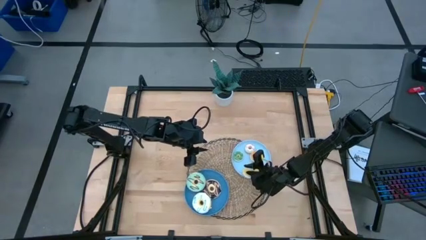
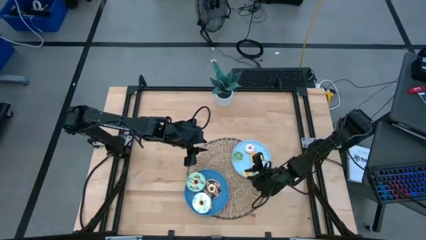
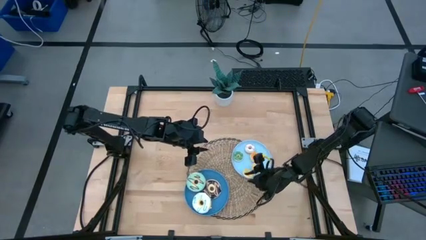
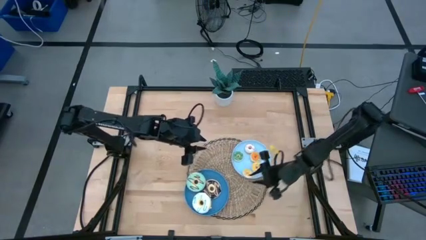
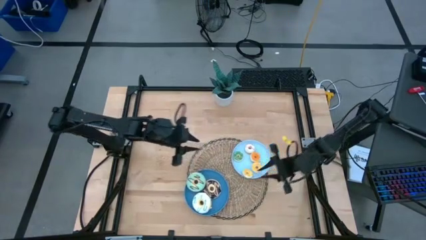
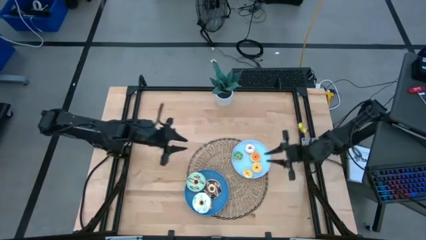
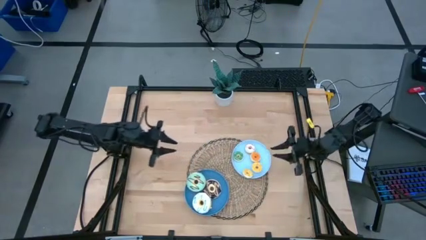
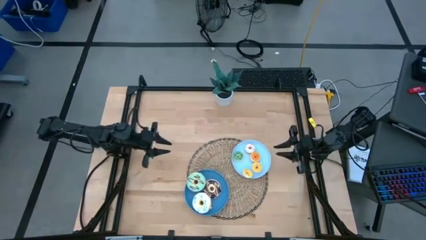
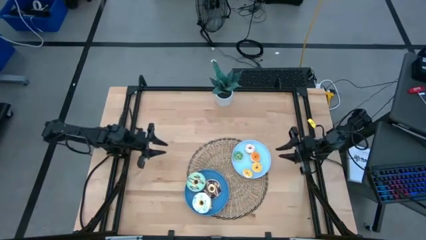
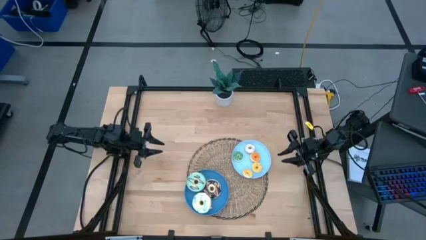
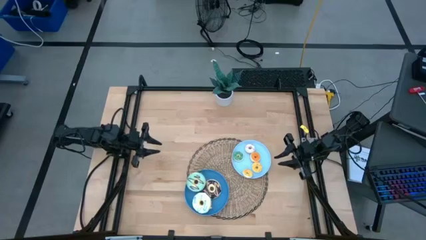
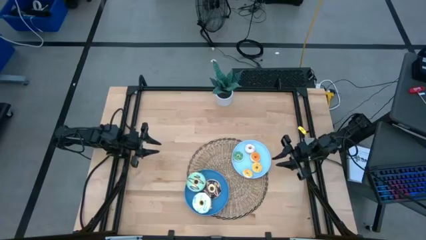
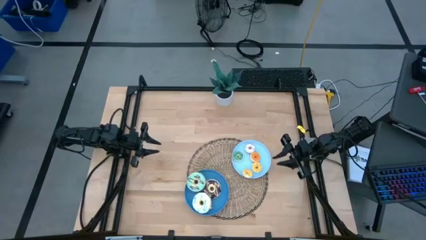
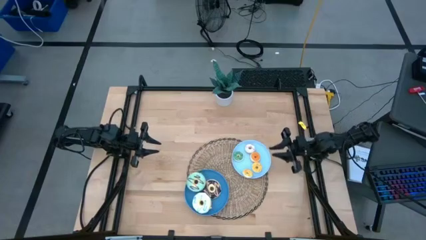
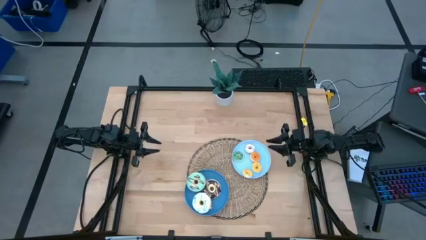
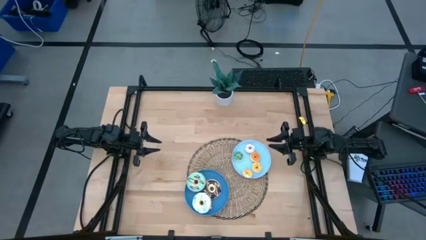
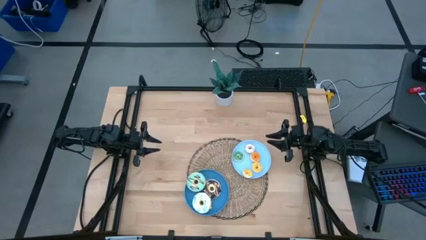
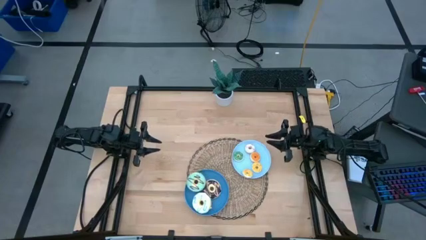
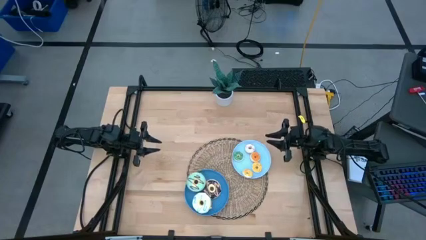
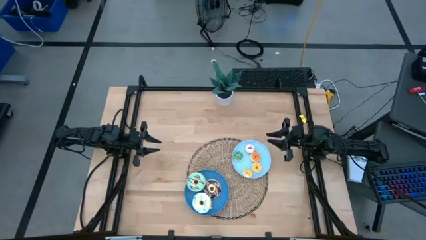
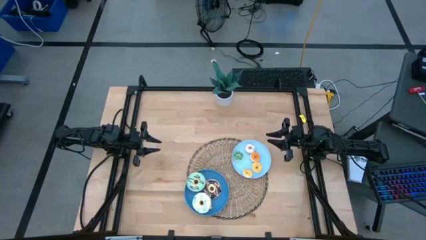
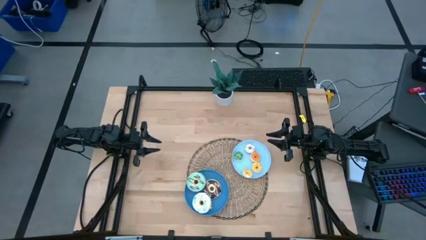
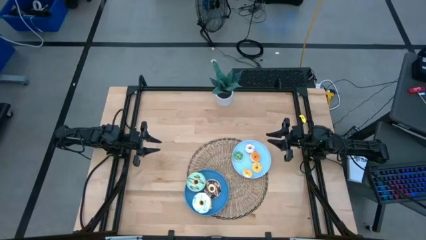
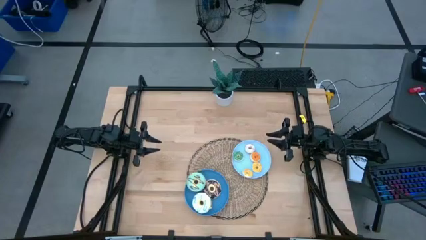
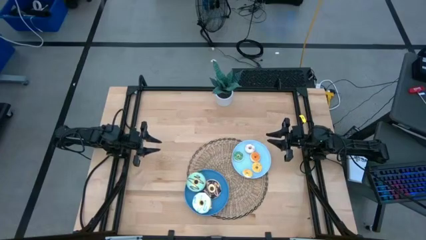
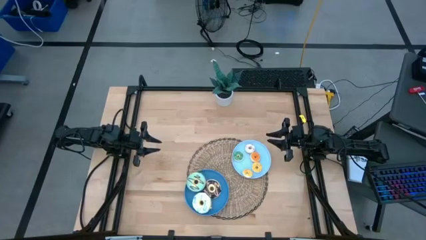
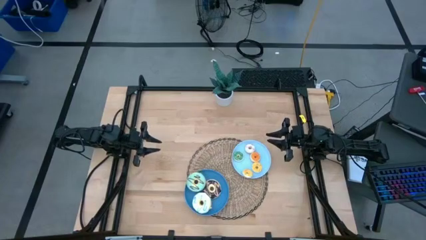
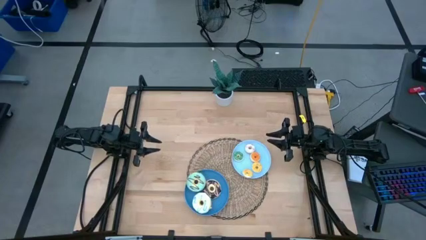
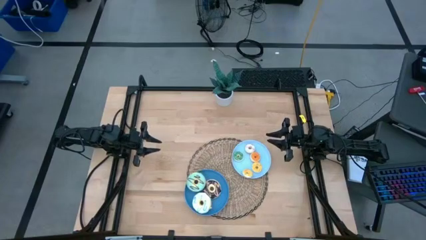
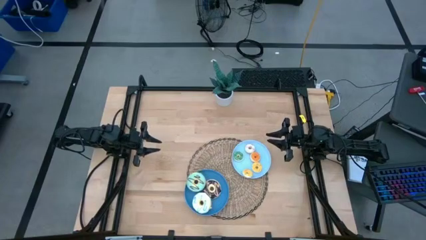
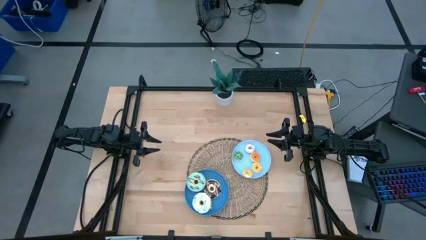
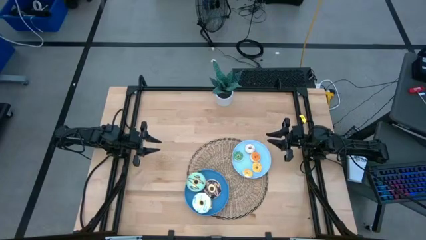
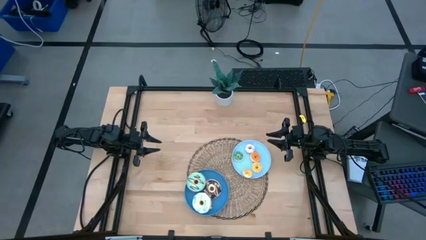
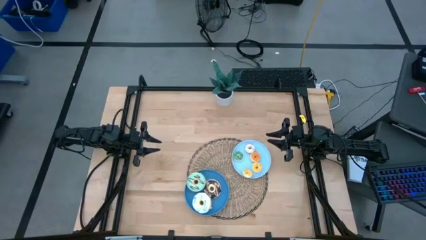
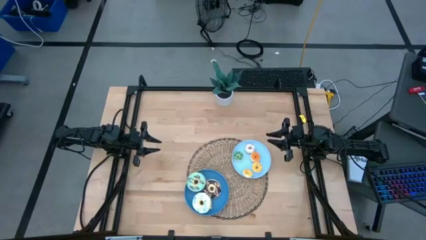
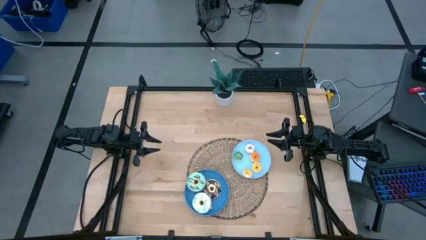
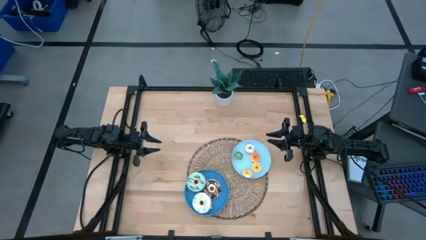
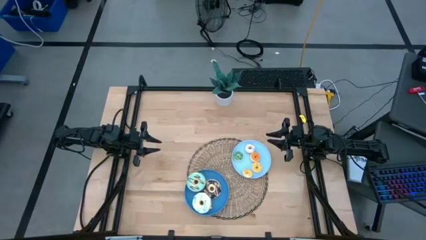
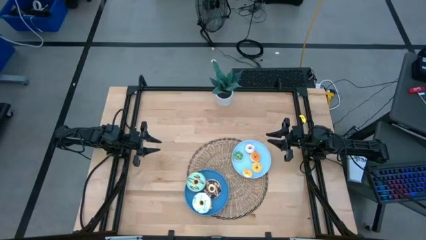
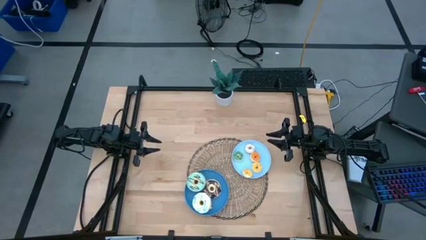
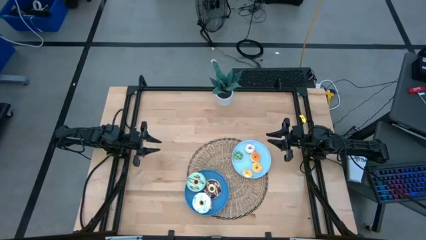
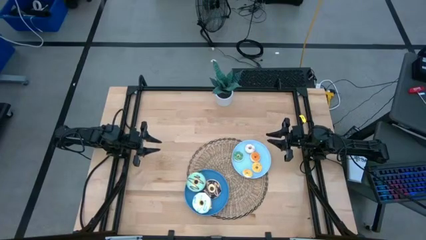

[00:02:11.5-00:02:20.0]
Task: Pick & Place donuts
Return to Home Position

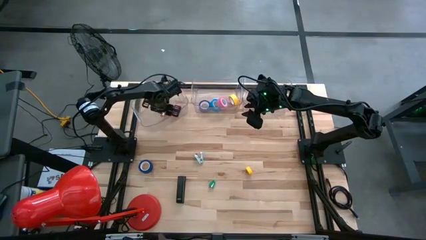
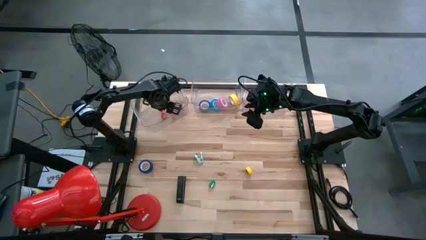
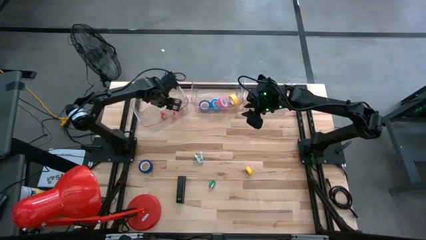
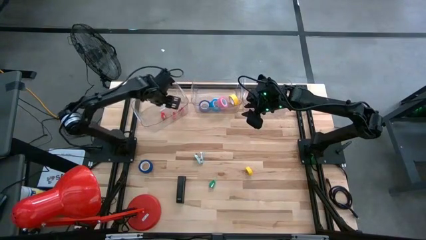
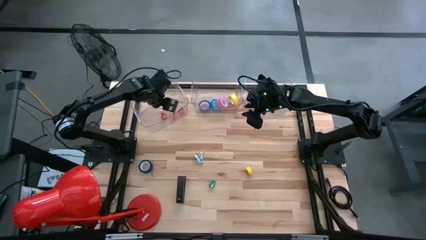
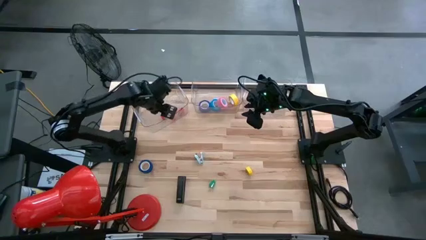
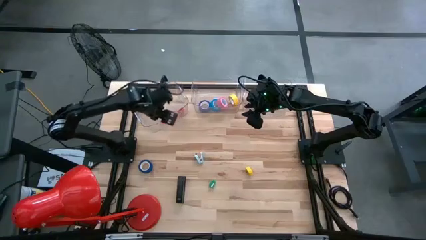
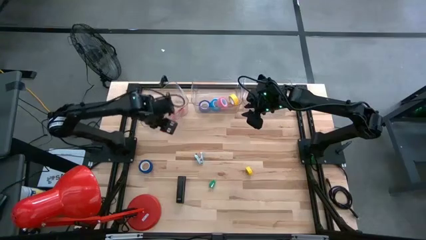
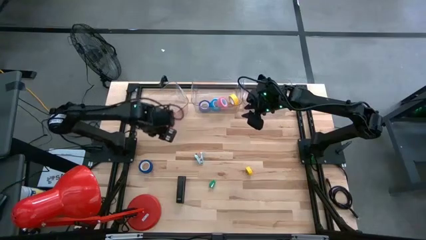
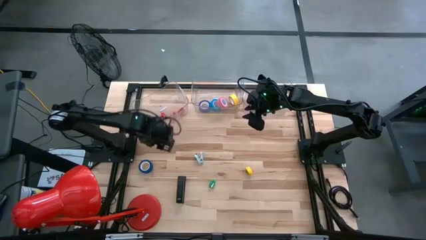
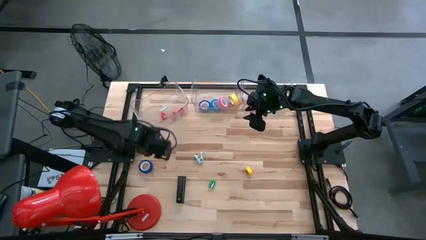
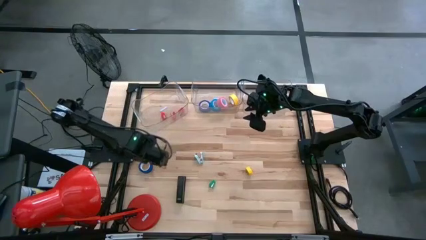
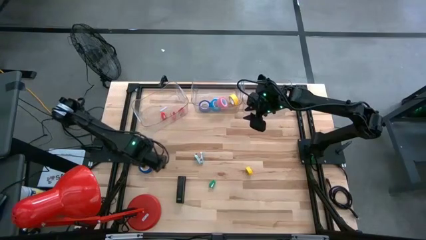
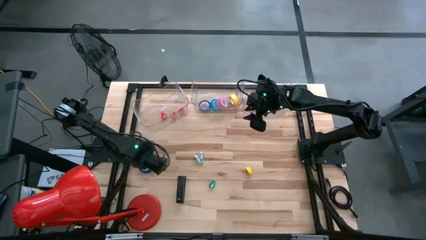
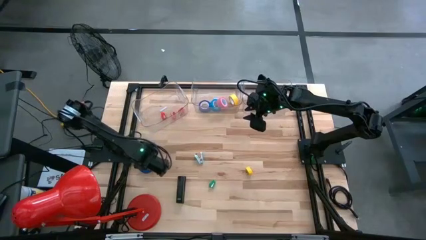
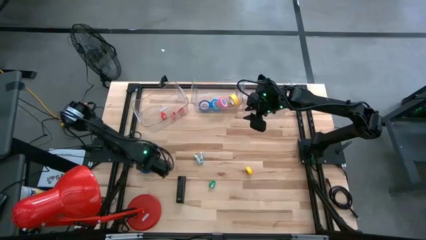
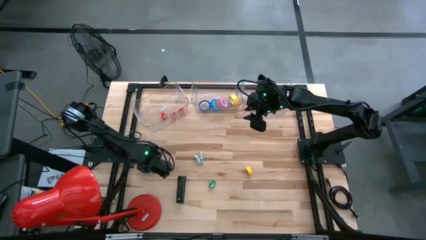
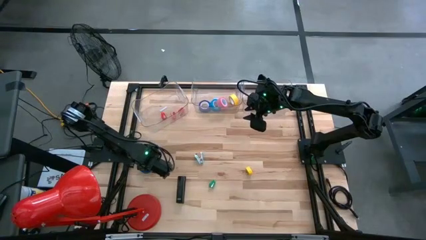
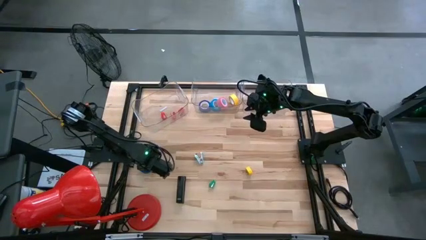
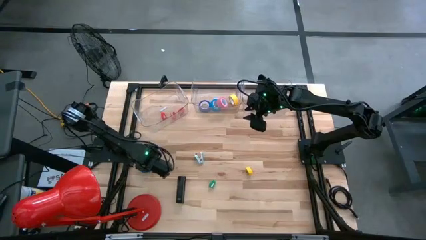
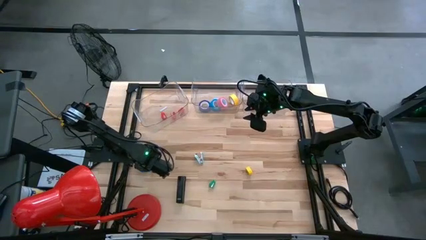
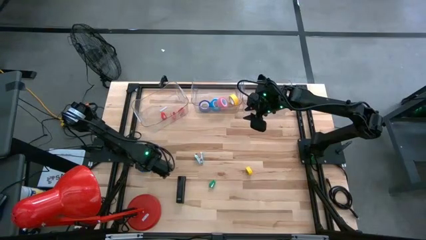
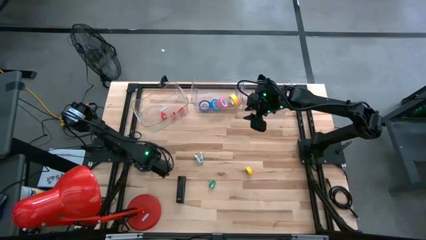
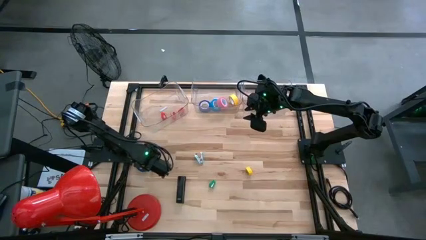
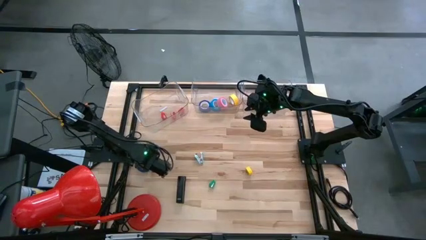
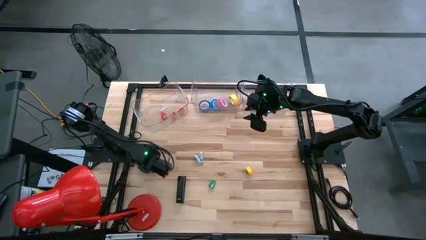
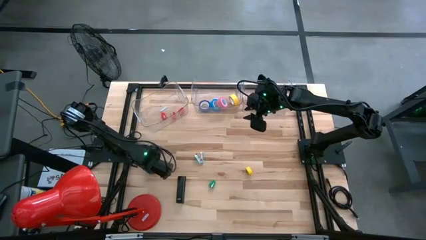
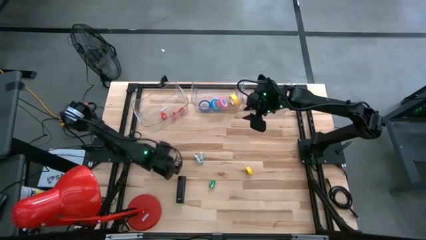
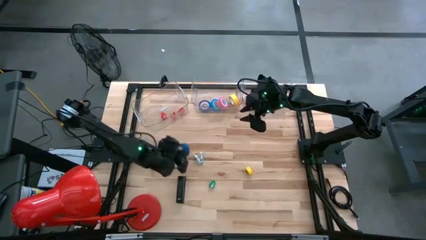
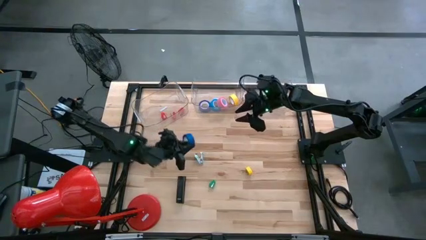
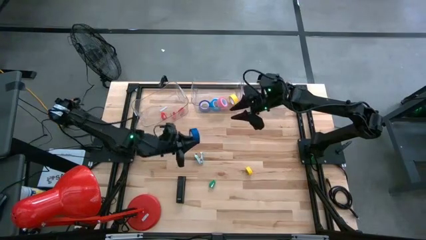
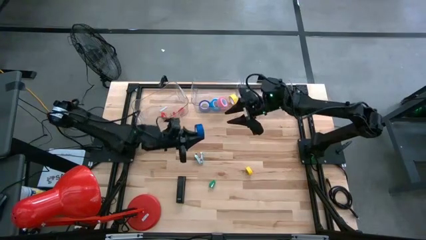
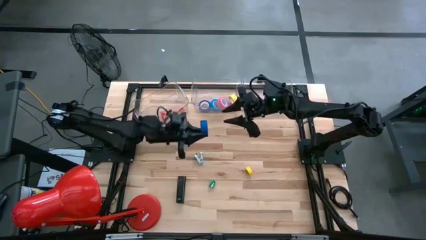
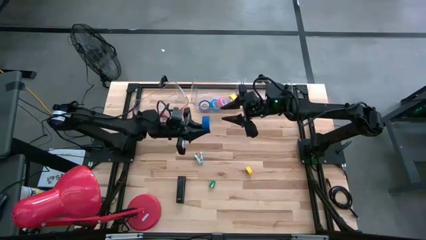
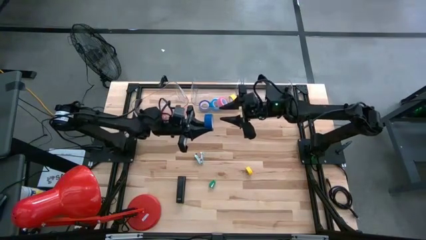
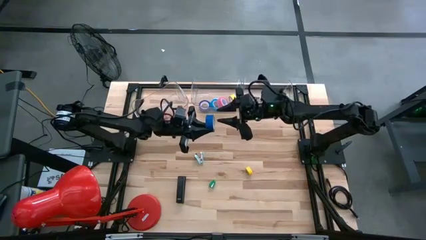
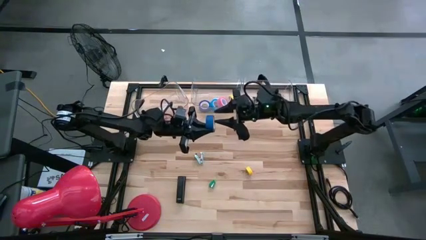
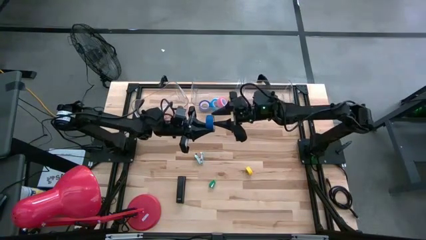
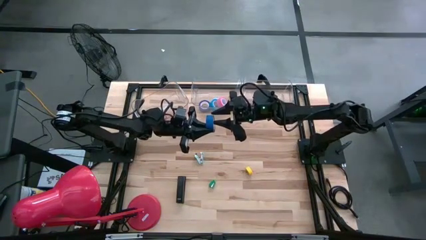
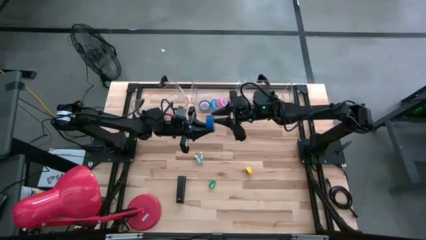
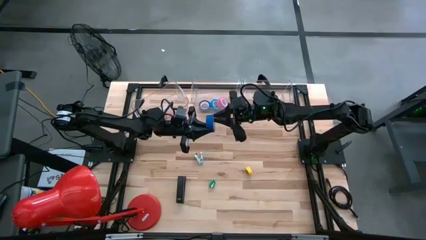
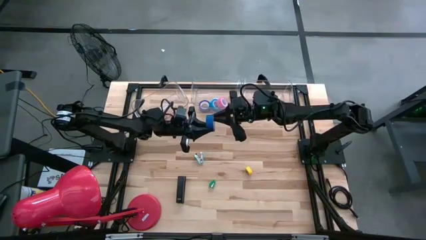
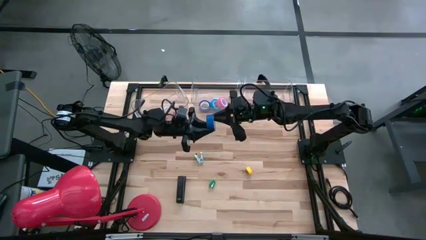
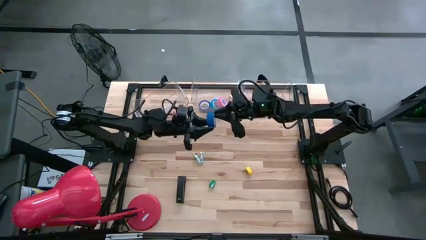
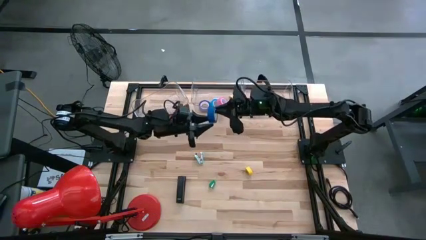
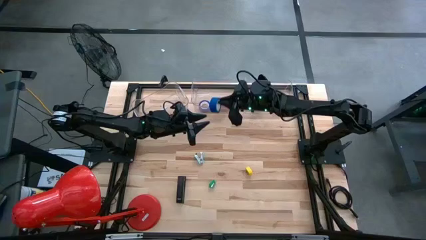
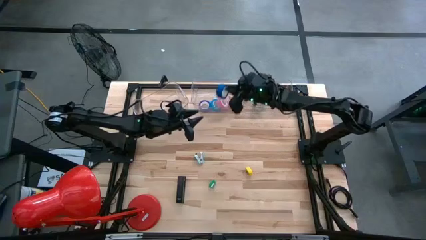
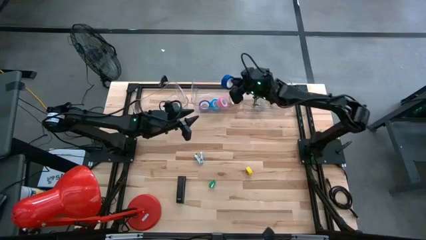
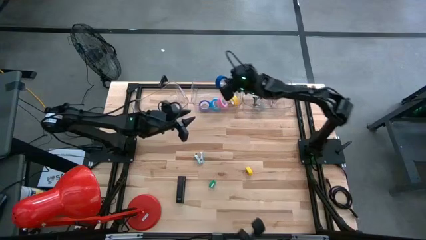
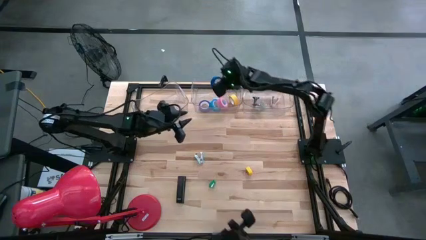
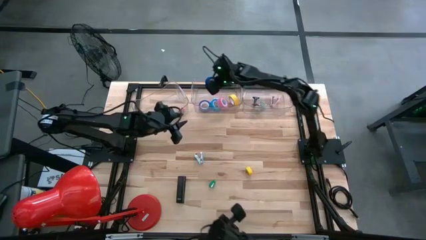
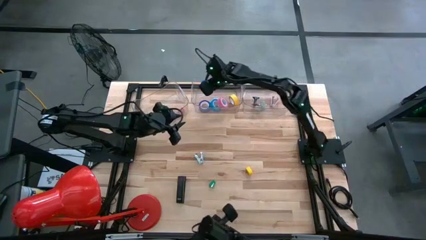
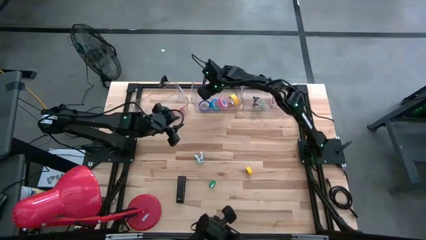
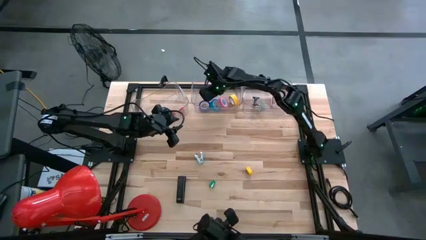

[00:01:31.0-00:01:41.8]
Task: Pick and place Stapler, Stapler remover, tape
Put the dark blue tape into the middle transparent bin
